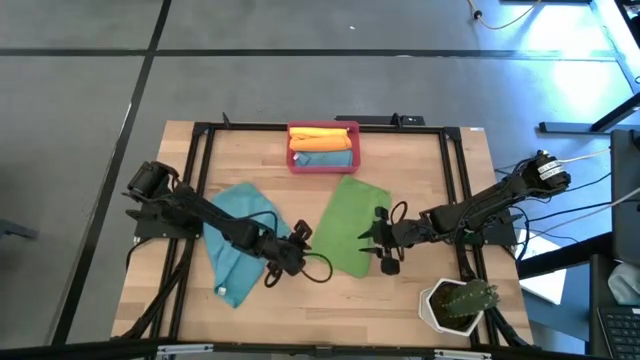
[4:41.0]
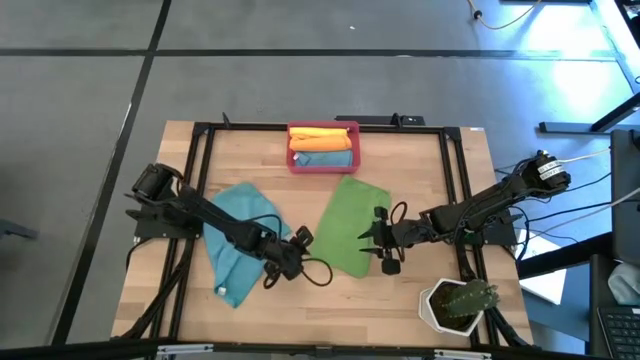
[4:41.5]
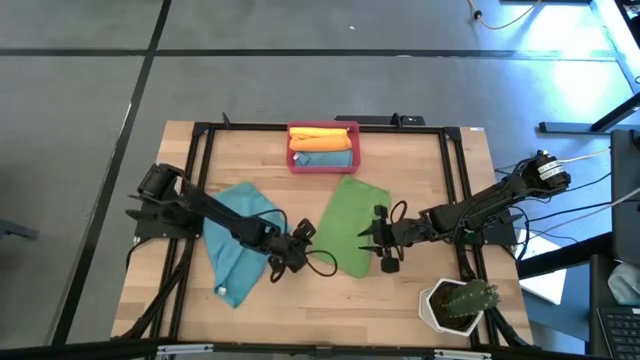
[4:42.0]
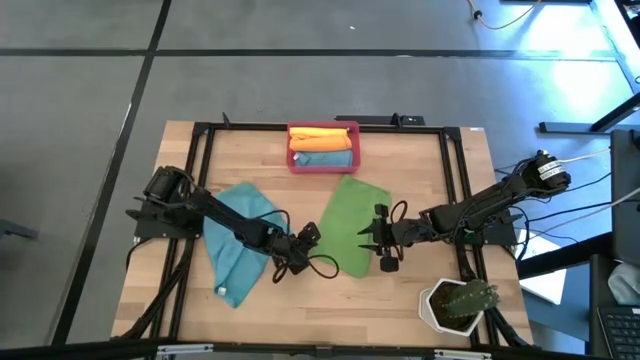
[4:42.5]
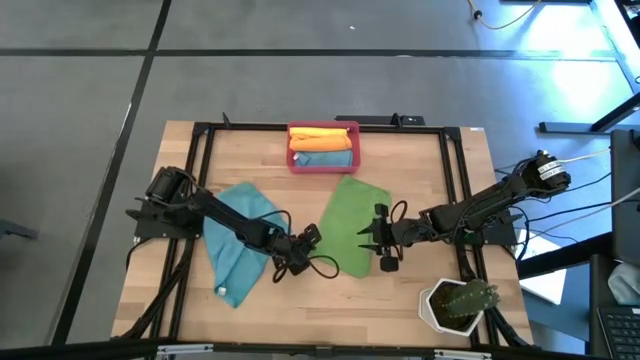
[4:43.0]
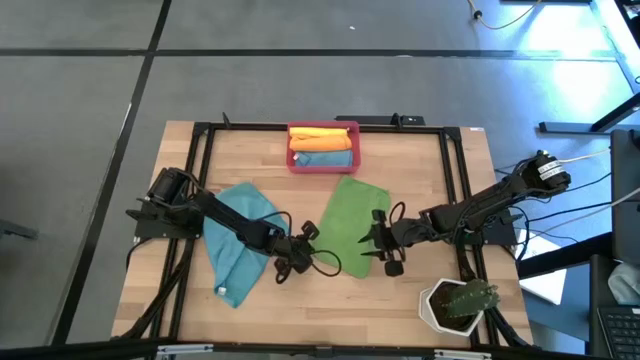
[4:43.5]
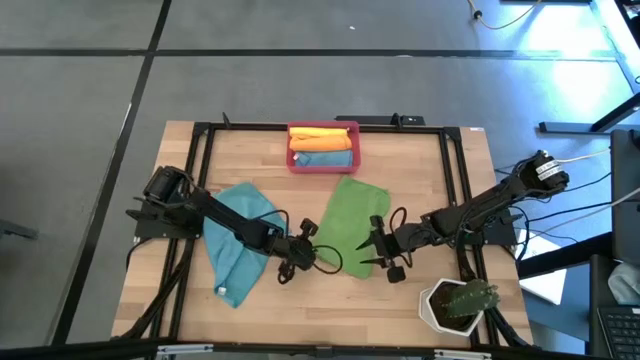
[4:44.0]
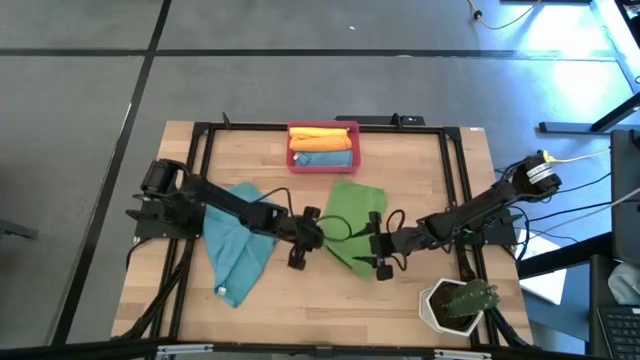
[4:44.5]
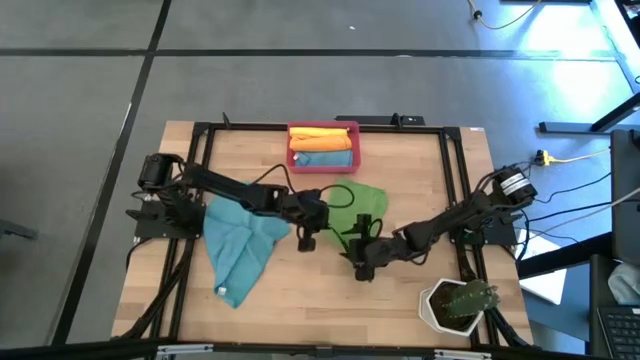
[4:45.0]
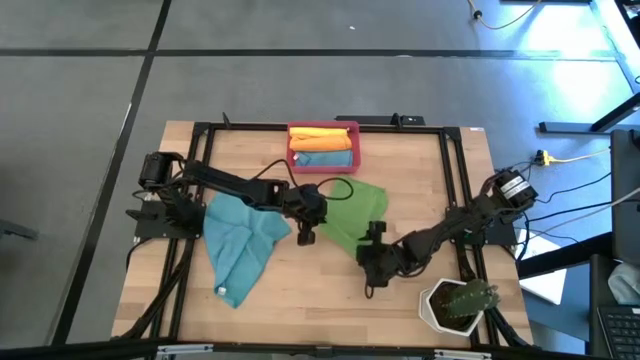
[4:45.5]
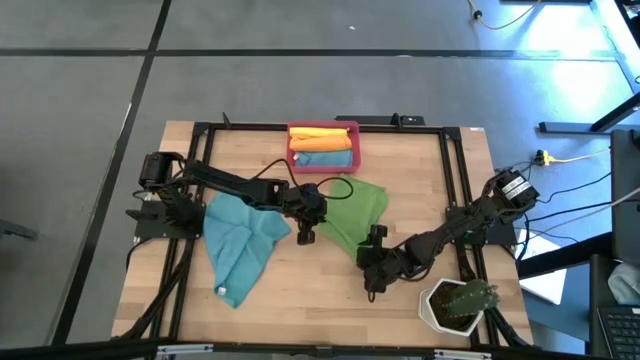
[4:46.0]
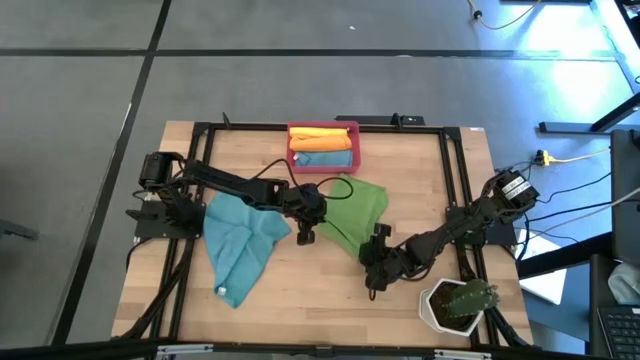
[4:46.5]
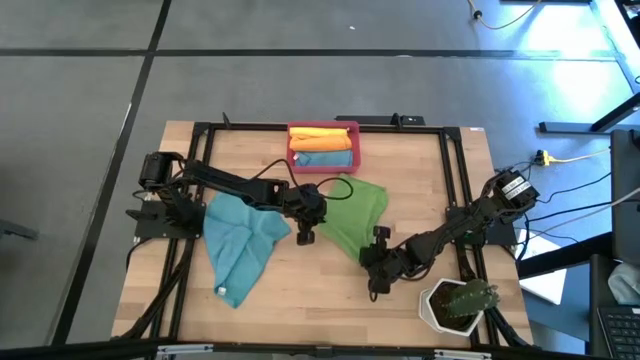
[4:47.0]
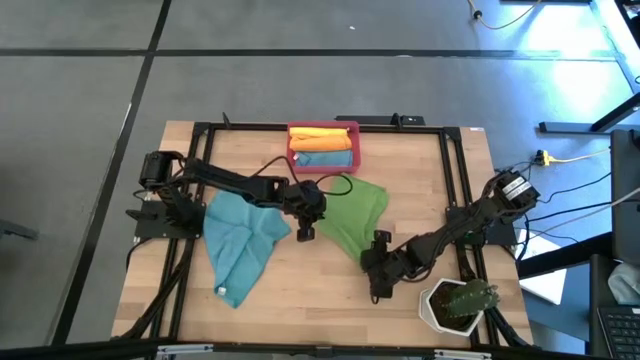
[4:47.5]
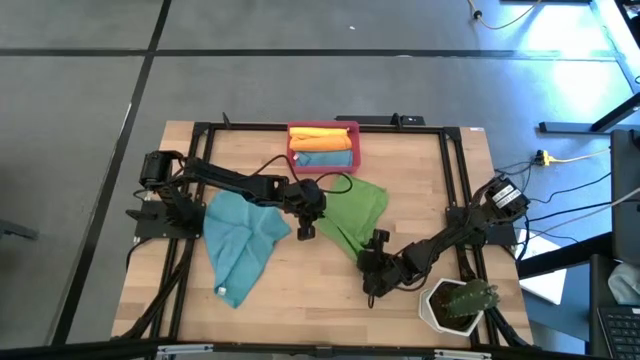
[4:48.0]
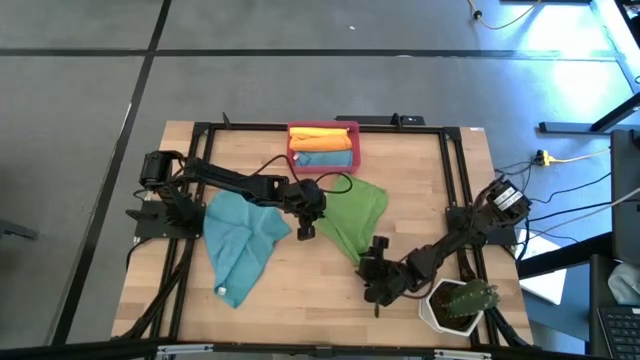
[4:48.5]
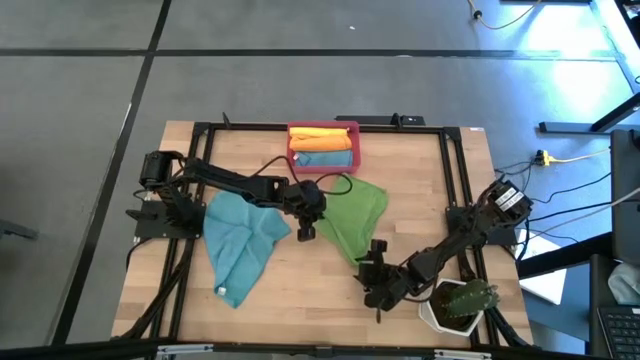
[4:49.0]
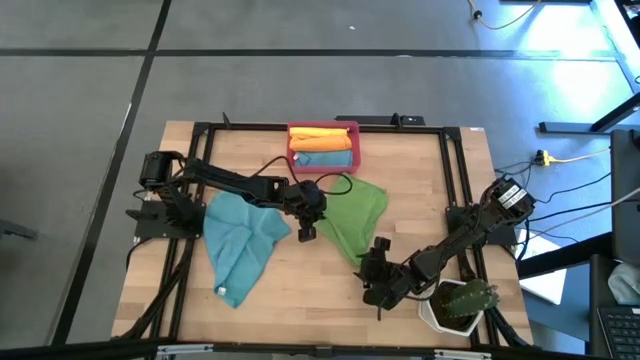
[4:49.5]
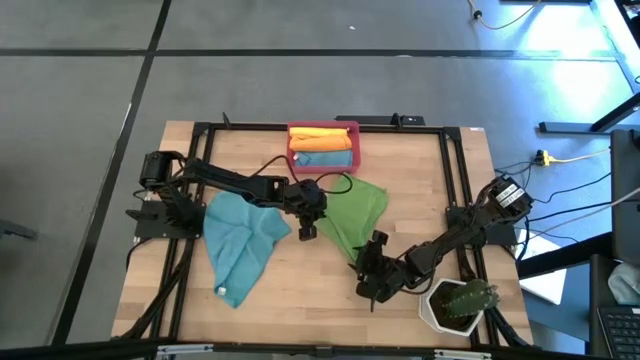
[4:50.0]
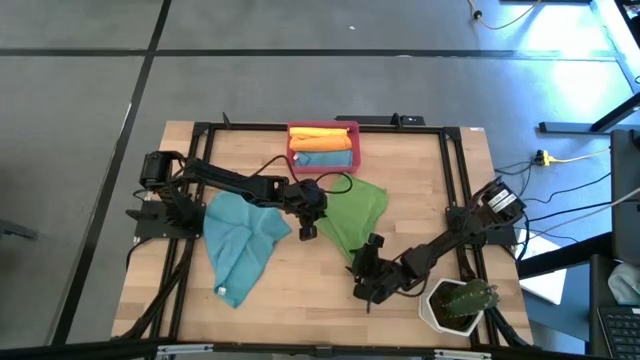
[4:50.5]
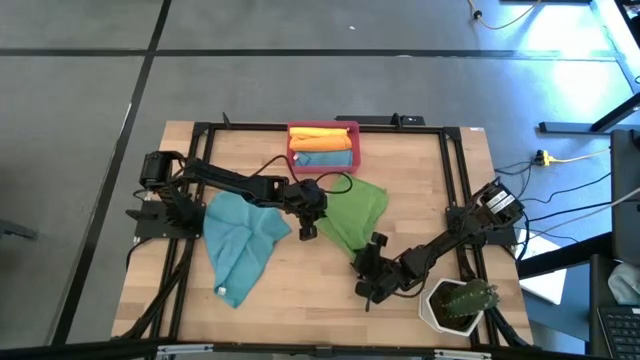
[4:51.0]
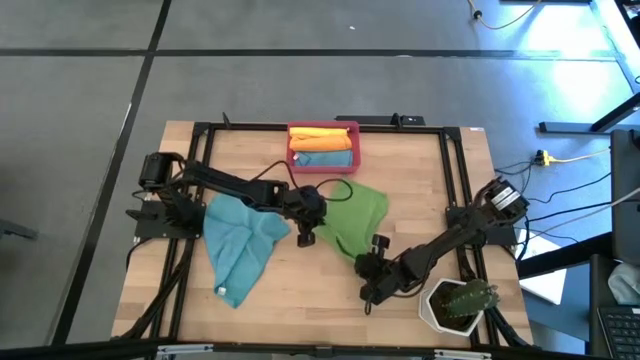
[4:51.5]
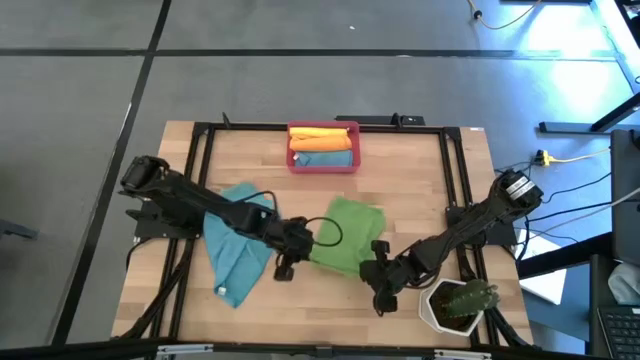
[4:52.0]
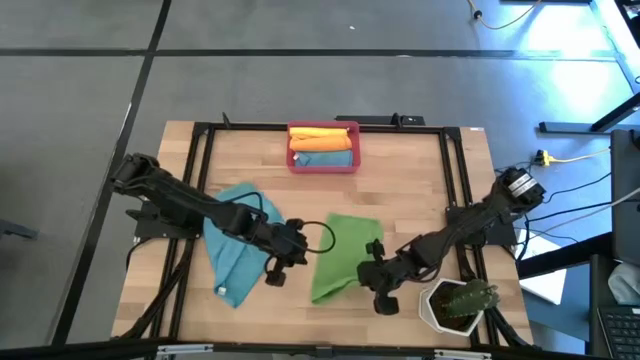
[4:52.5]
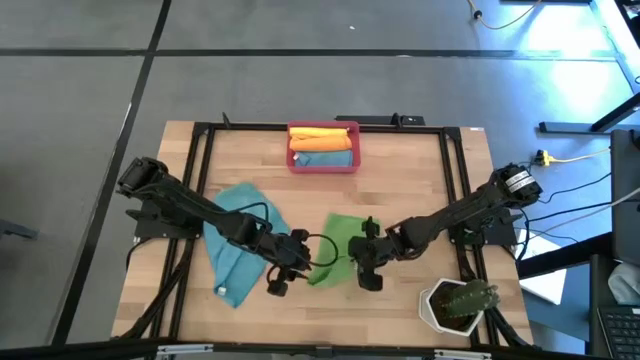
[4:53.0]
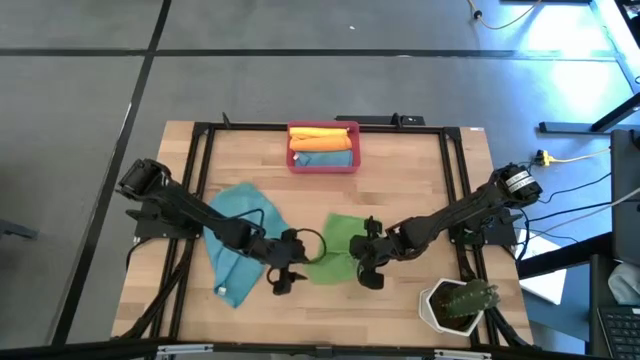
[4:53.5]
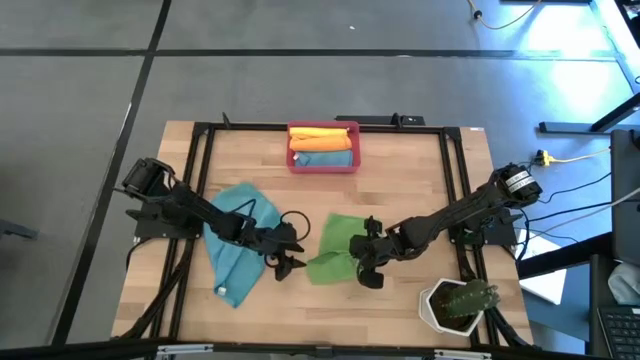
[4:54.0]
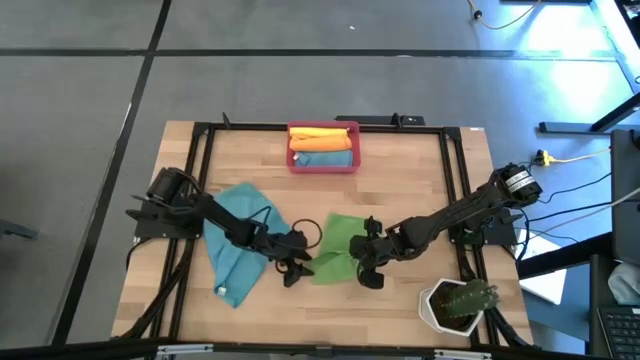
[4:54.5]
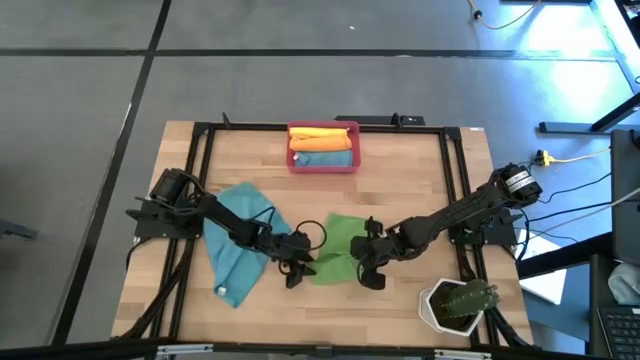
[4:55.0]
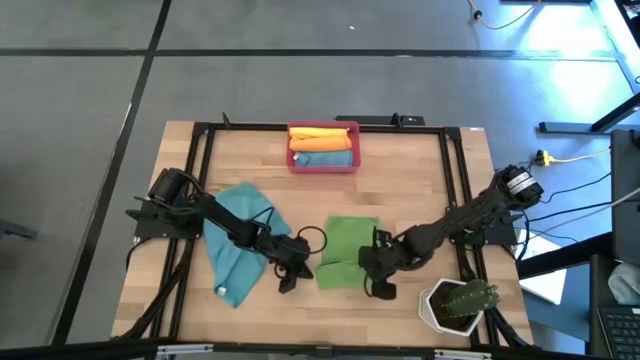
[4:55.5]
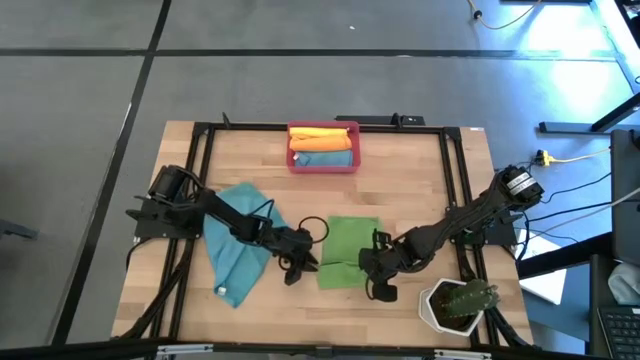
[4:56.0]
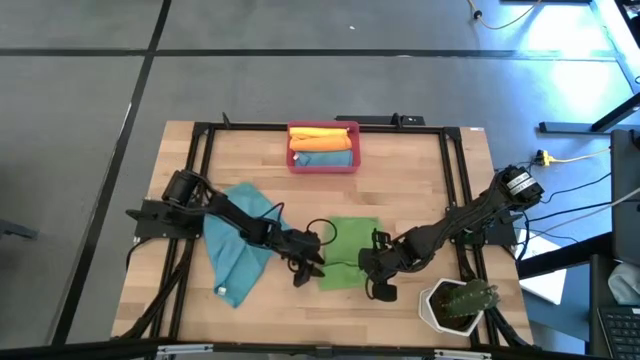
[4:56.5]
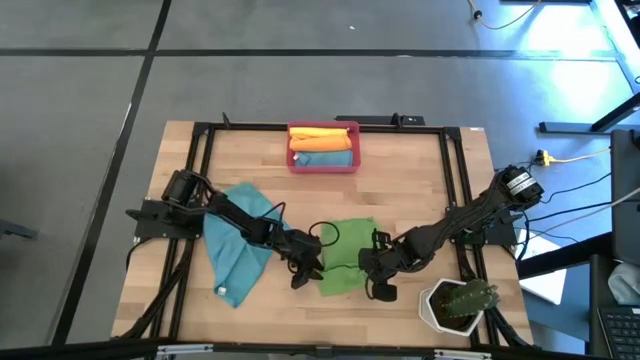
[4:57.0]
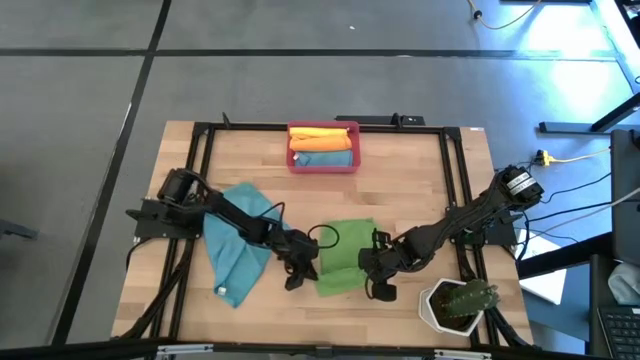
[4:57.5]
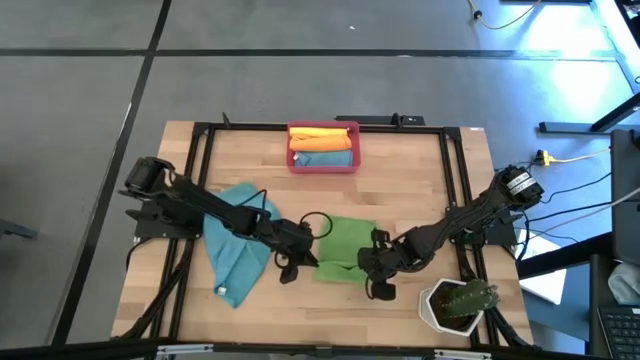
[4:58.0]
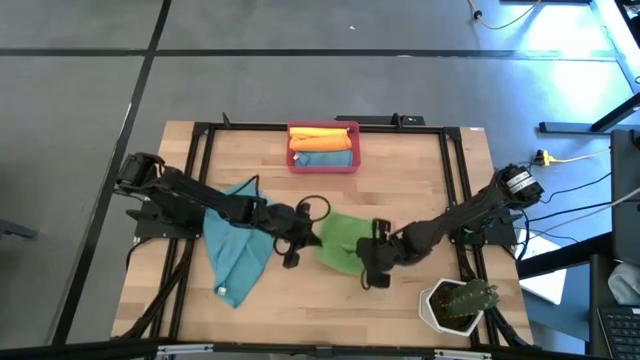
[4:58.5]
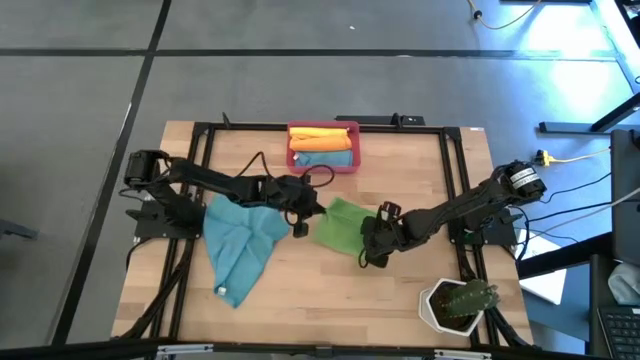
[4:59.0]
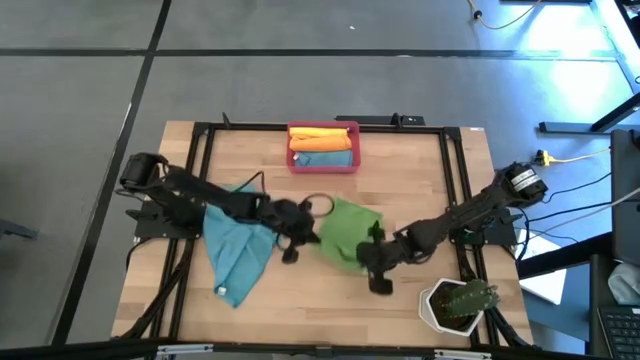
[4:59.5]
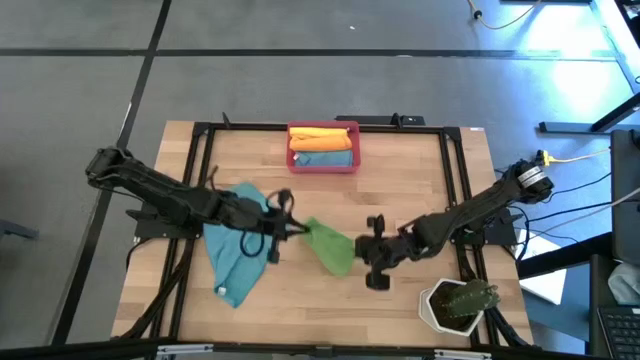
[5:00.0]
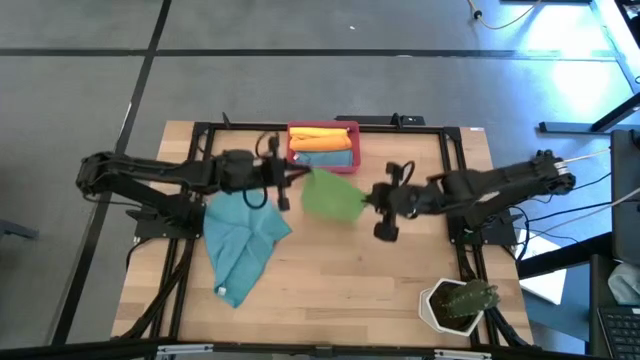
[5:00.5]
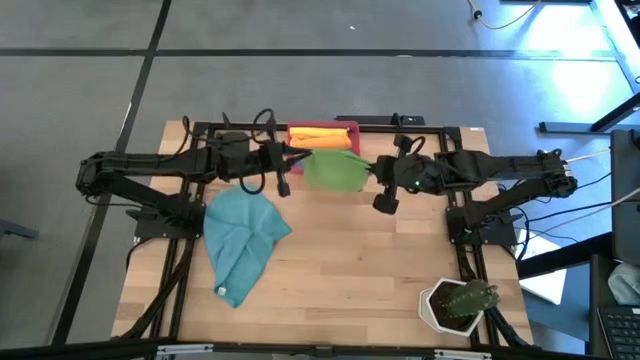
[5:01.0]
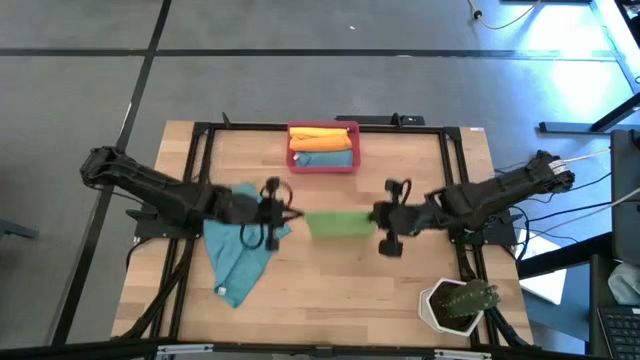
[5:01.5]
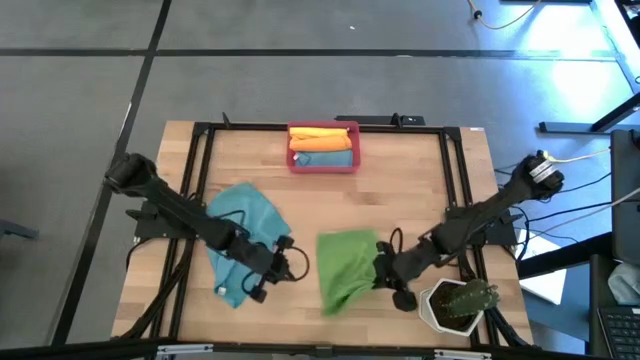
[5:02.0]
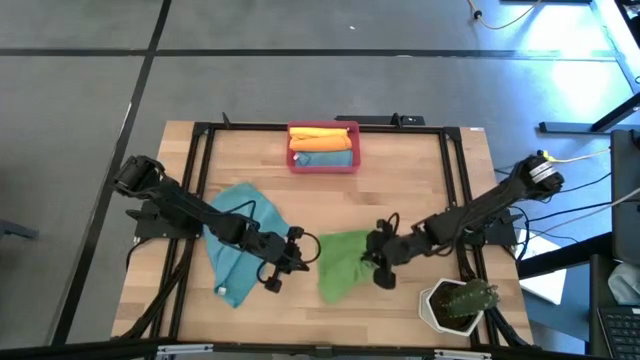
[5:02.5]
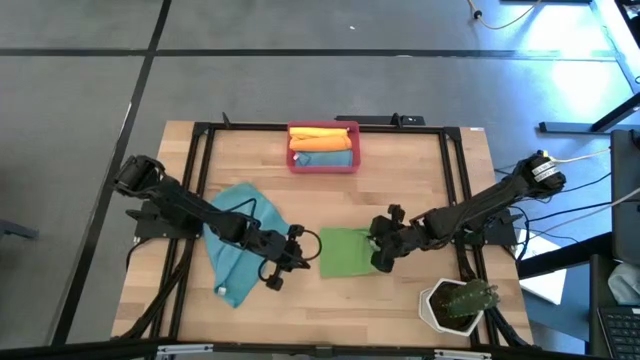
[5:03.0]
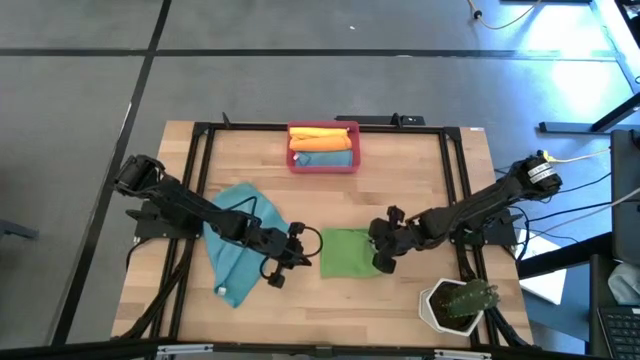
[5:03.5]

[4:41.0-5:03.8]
Task: Roll microfiber towels into tight, uniform cylinder then place into a basket
Fold the green microfiber towel
